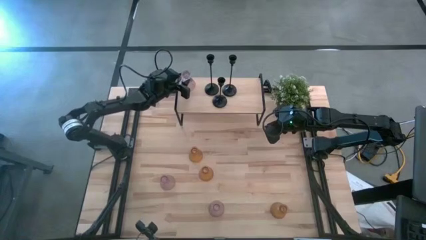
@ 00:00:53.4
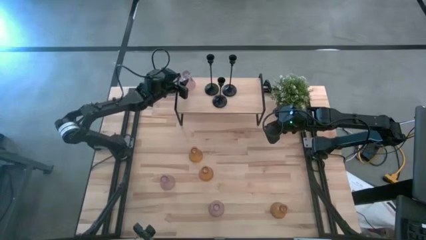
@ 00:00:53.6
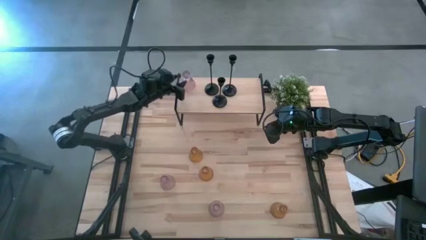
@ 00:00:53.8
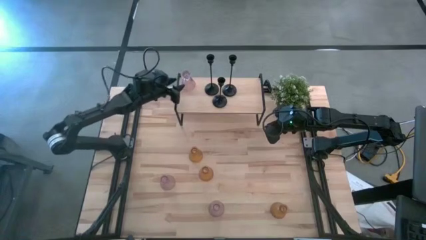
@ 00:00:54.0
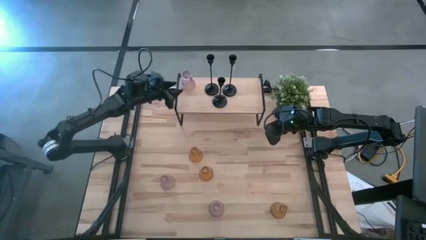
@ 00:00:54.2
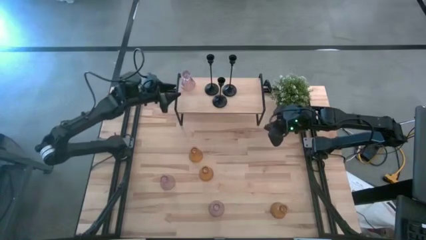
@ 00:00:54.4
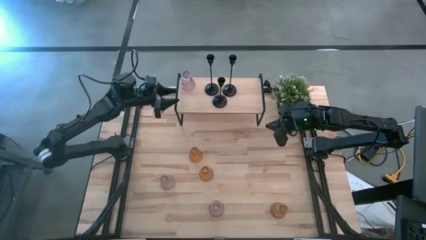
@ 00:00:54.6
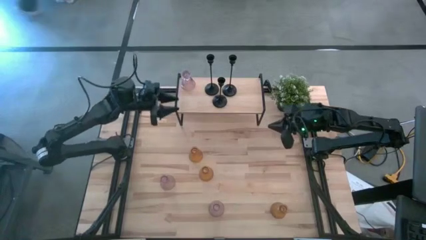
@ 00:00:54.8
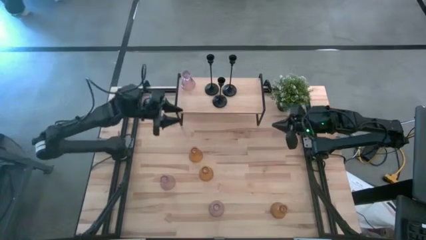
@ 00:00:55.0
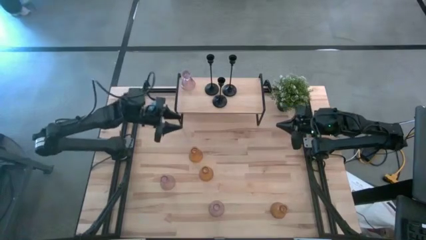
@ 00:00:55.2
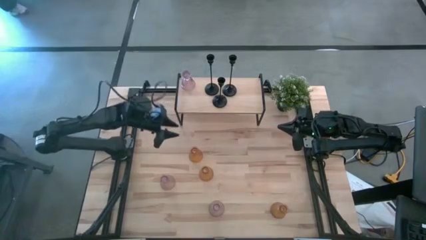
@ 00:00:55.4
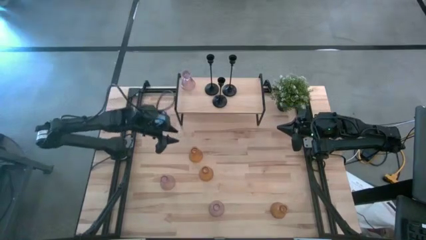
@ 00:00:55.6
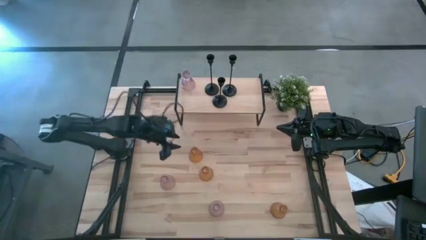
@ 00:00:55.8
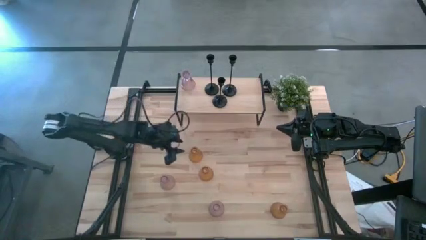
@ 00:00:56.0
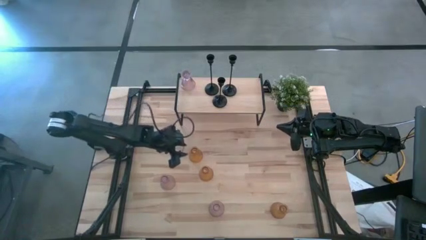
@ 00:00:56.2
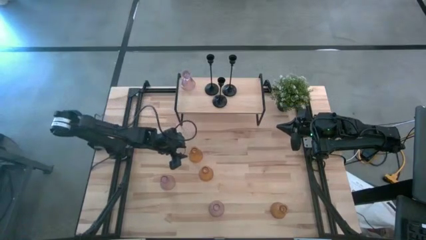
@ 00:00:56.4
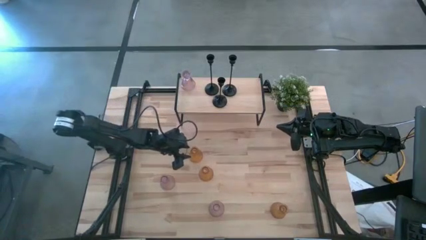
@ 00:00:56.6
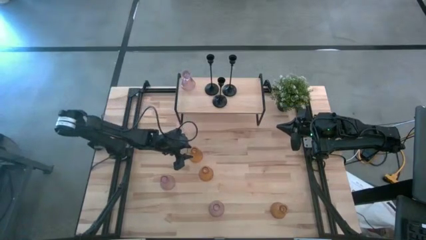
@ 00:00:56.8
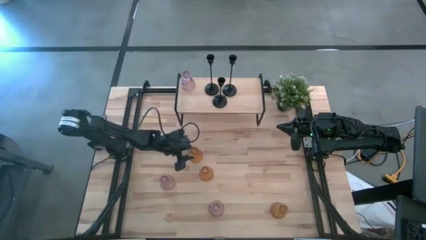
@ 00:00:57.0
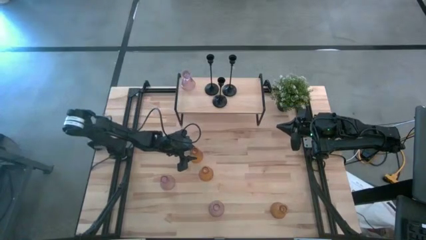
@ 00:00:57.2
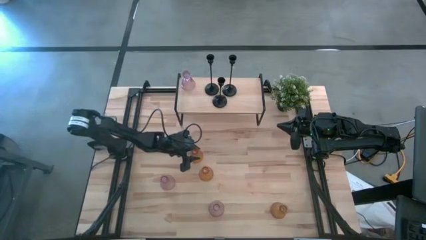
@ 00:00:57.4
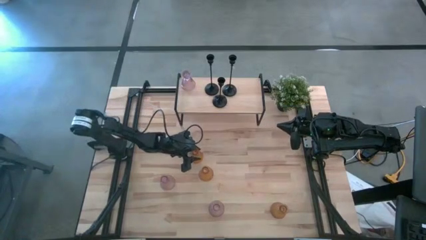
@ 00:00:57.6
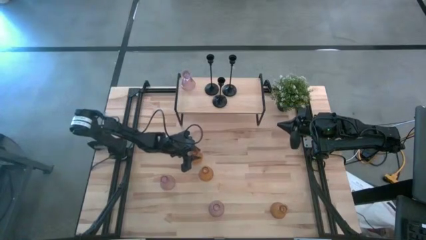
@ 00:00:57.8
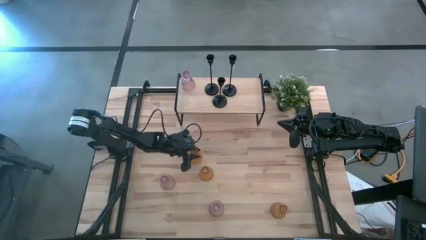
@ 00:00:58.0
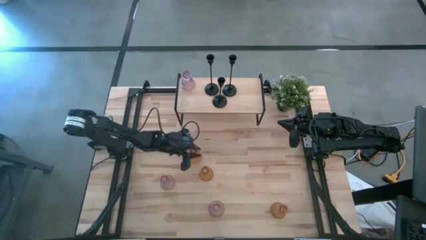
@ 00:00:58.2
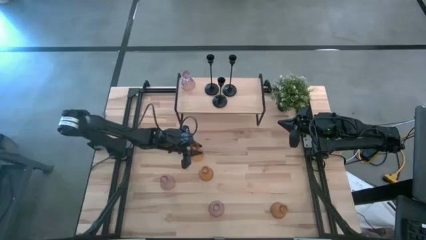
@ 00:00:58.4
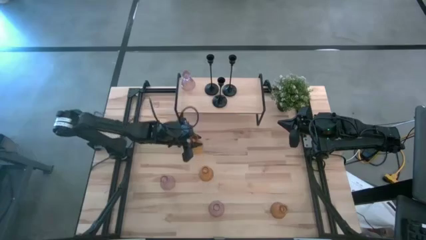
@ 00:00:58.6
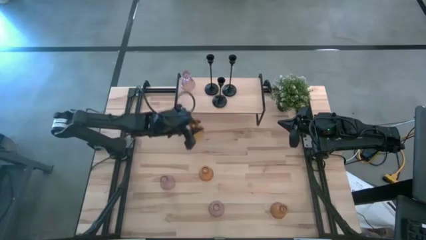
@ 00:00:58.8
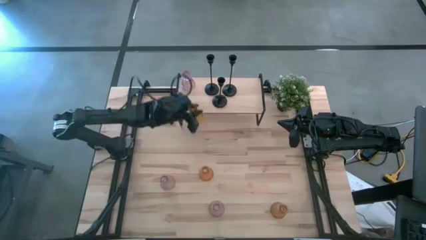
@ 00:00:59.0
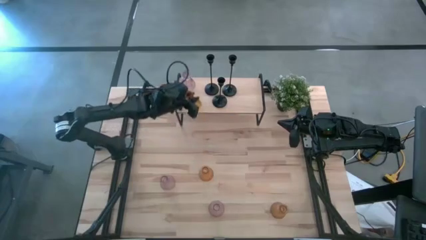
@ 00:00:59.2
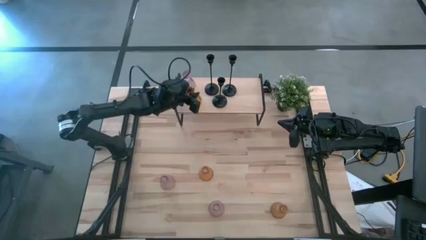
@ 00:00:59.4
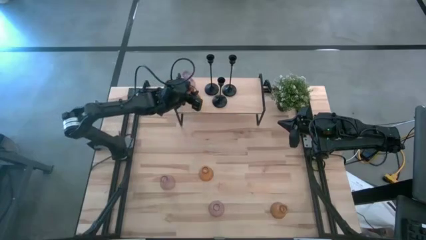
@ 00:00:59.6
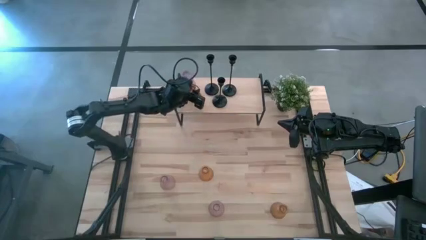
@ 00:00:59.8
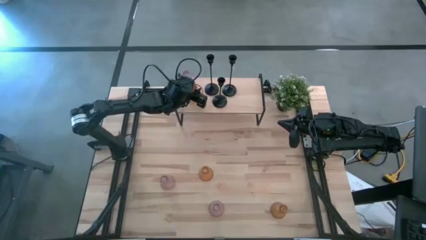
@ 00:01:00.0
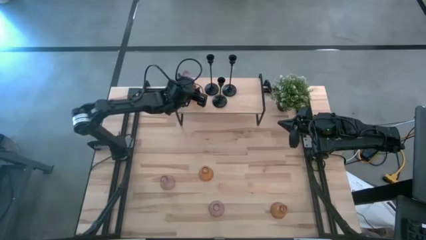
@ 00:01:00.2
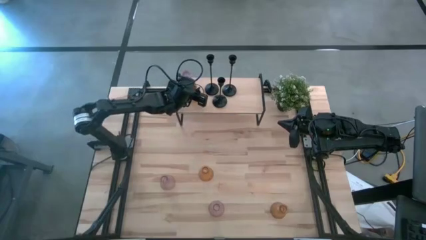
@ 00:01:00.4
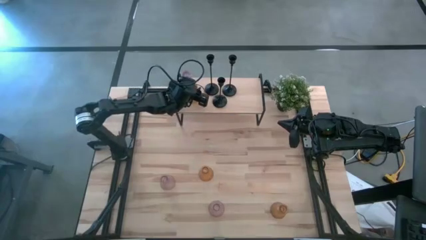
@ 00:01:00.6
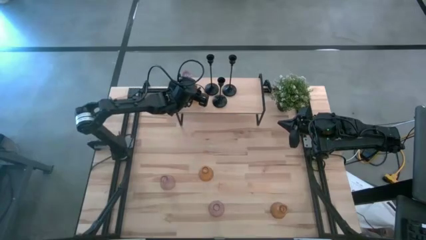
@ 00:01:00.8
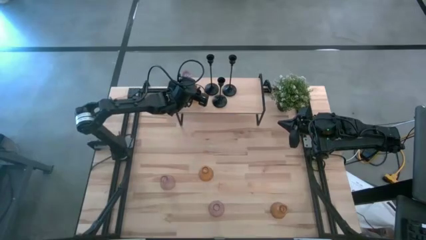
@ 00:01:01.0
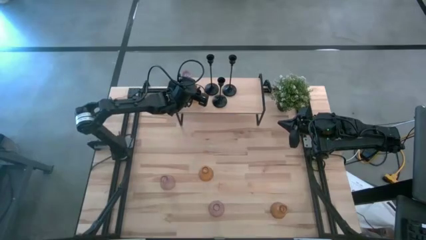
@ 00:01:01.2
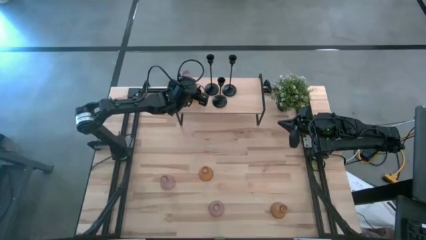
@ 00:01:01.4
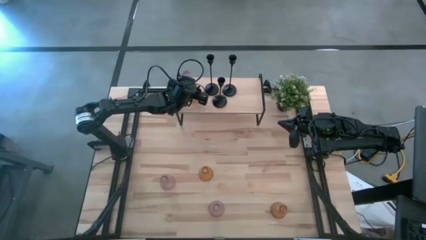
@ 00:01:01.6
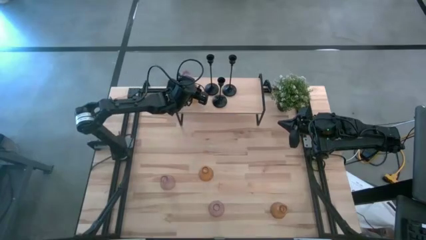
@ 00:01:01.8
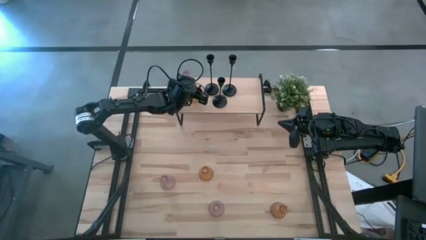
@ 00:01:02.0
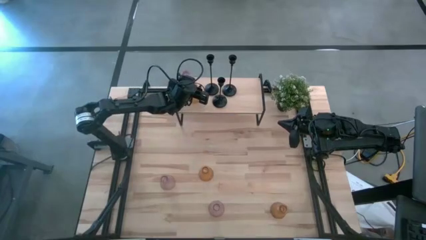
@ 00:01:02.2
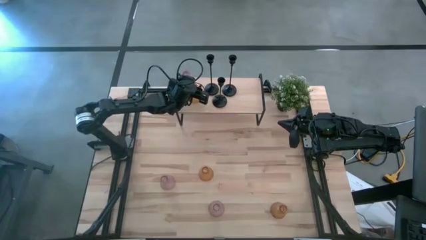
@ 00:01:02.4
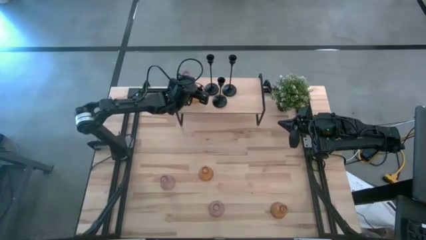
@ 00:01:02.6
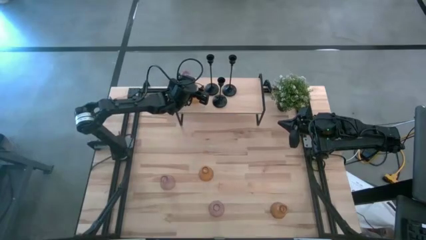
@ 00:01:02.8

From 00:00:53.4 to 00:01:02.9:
Task: Pick & Place candle stick holders
Put the top left orange glass candle holder on the shelf
